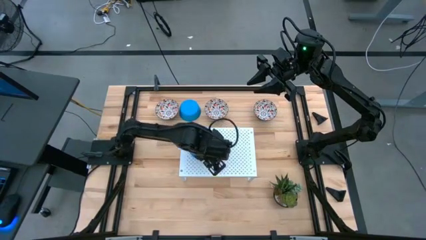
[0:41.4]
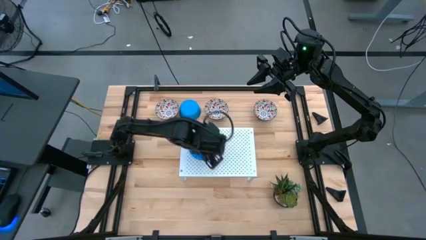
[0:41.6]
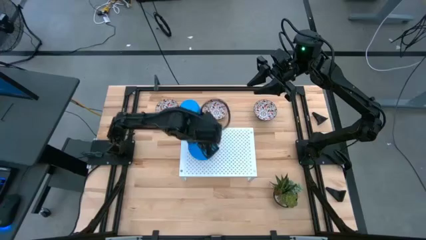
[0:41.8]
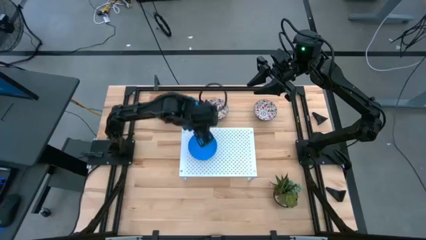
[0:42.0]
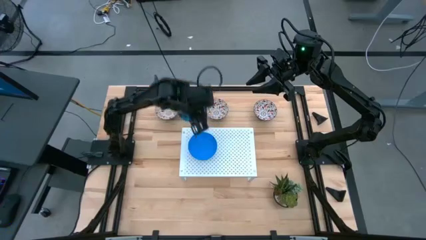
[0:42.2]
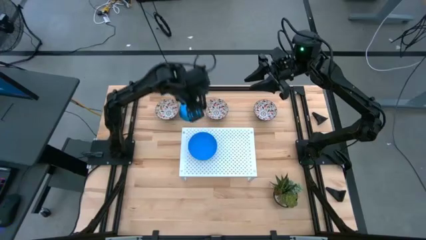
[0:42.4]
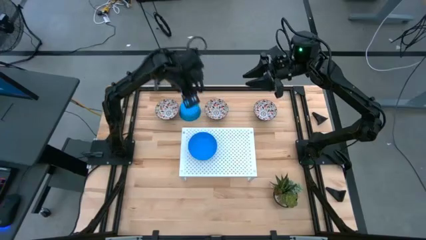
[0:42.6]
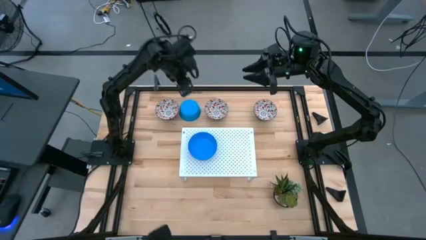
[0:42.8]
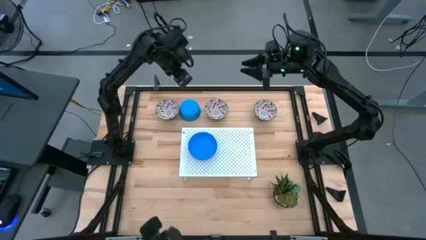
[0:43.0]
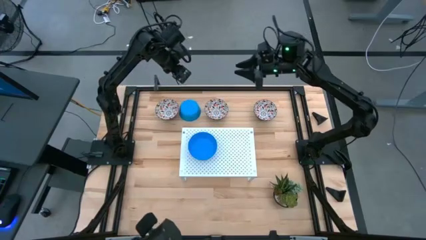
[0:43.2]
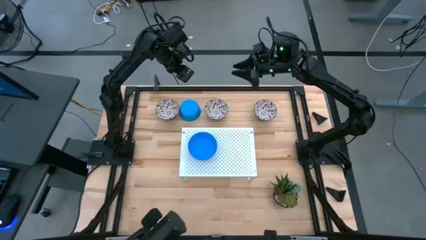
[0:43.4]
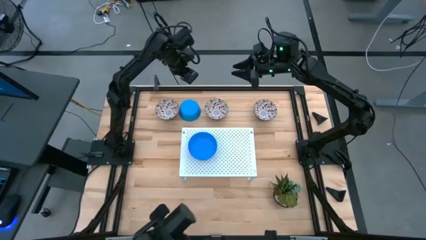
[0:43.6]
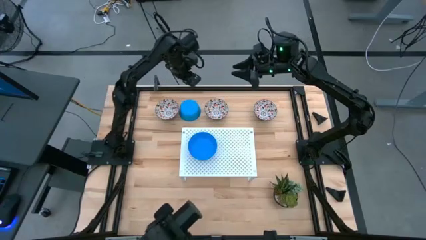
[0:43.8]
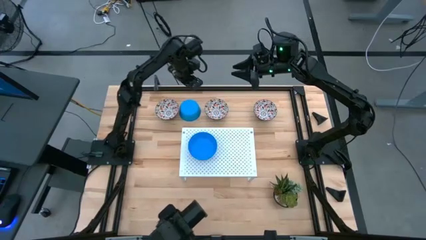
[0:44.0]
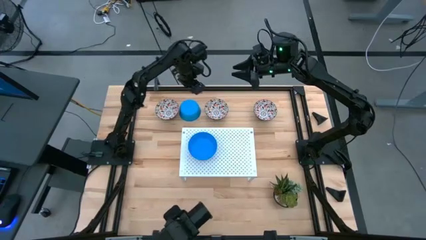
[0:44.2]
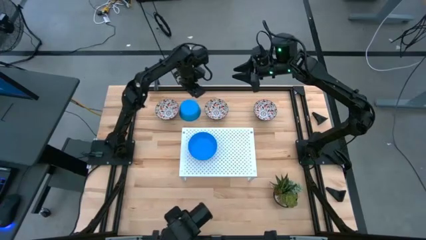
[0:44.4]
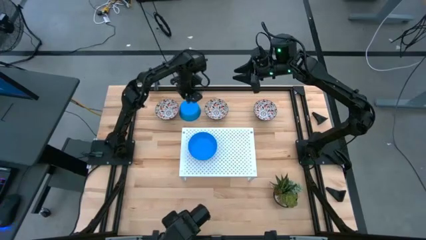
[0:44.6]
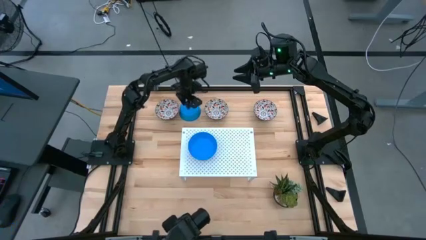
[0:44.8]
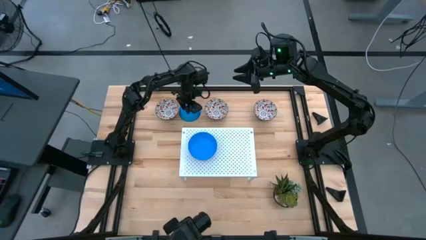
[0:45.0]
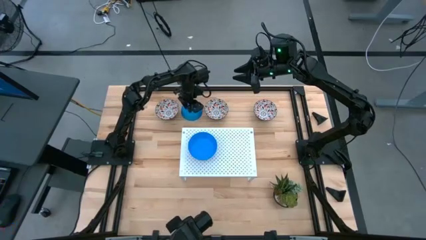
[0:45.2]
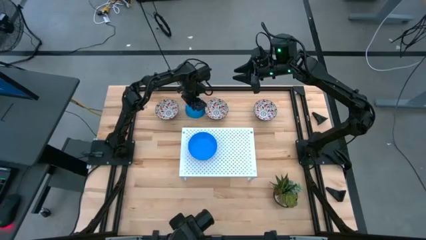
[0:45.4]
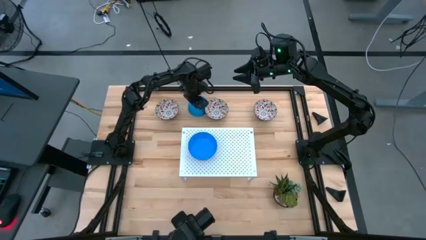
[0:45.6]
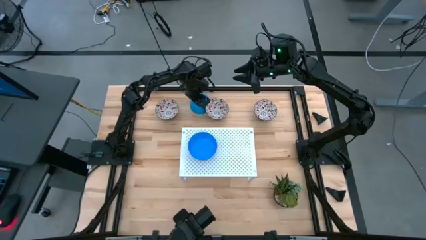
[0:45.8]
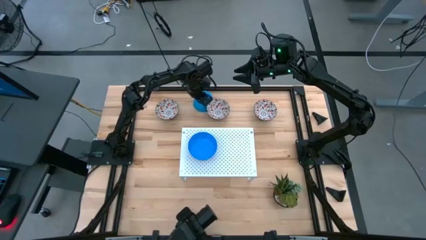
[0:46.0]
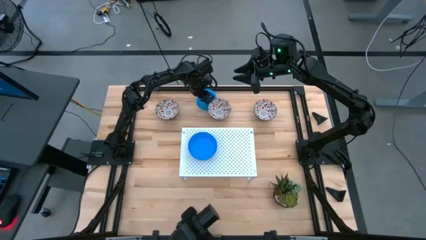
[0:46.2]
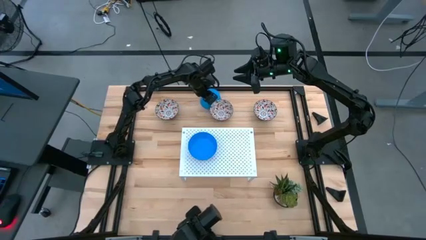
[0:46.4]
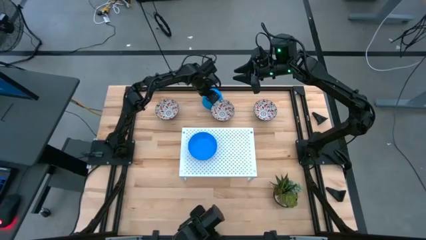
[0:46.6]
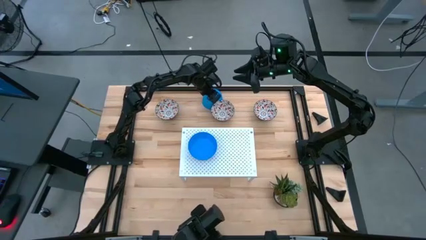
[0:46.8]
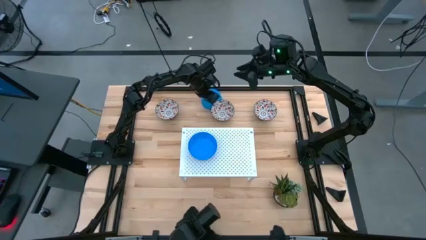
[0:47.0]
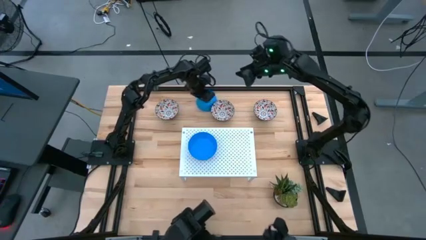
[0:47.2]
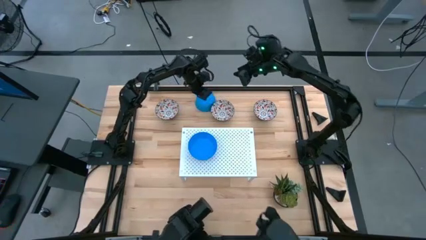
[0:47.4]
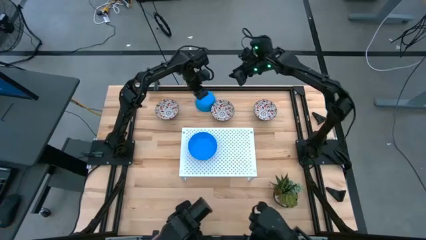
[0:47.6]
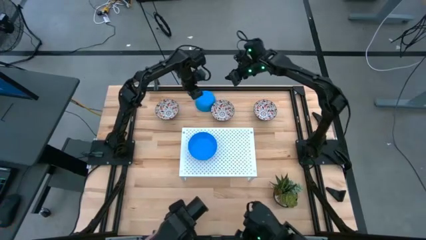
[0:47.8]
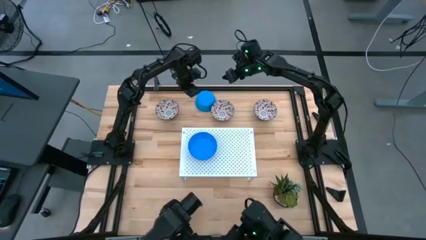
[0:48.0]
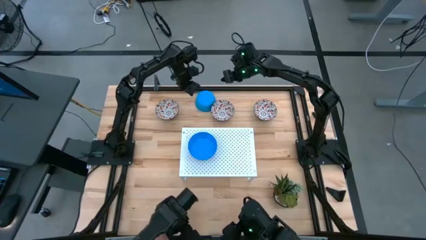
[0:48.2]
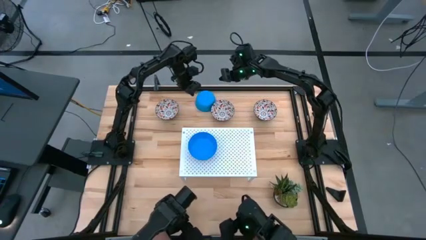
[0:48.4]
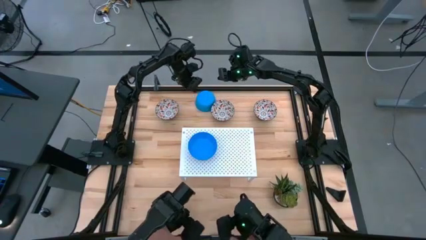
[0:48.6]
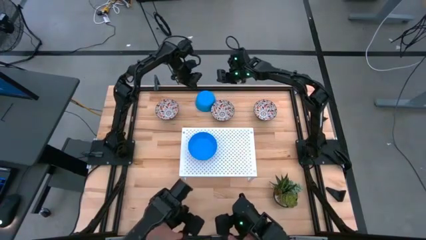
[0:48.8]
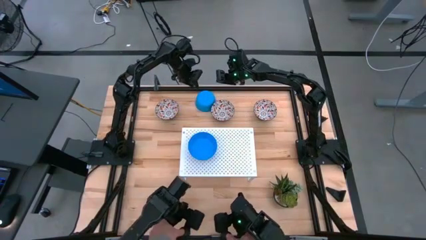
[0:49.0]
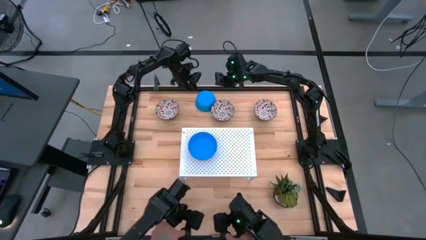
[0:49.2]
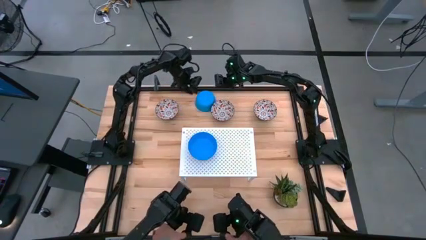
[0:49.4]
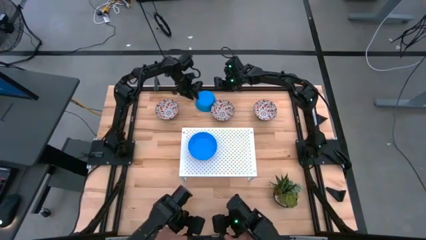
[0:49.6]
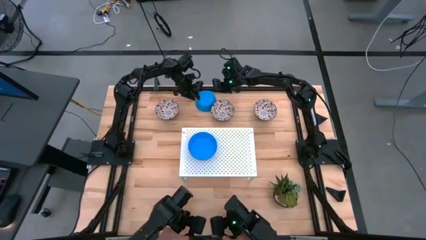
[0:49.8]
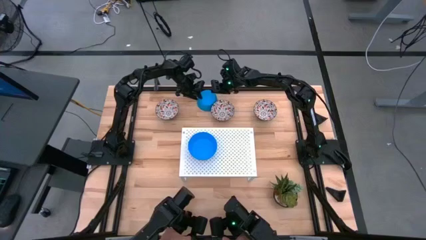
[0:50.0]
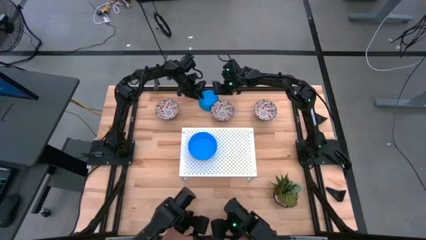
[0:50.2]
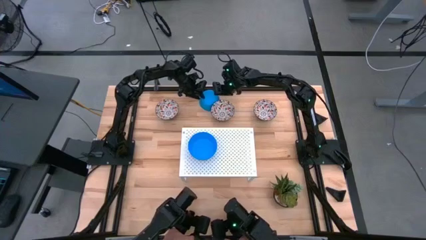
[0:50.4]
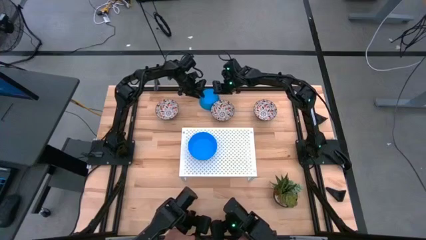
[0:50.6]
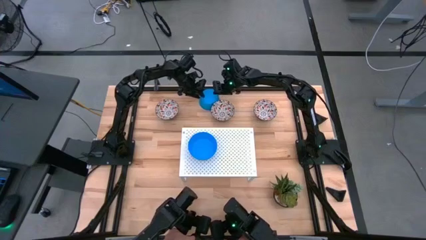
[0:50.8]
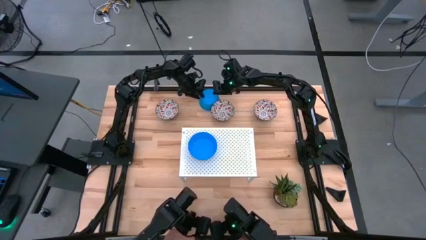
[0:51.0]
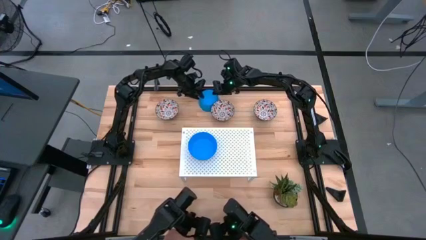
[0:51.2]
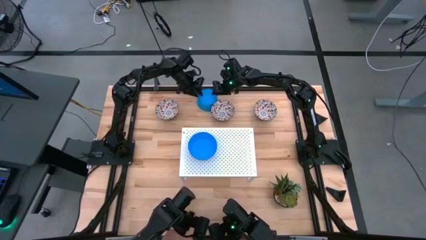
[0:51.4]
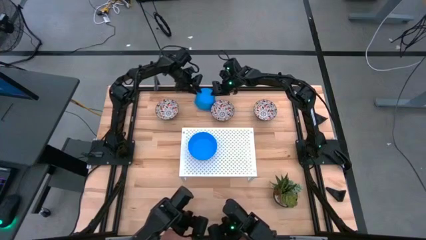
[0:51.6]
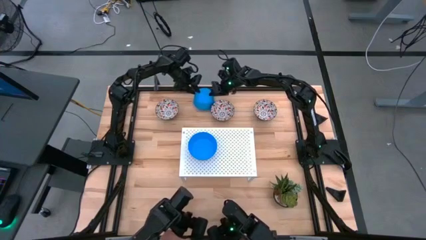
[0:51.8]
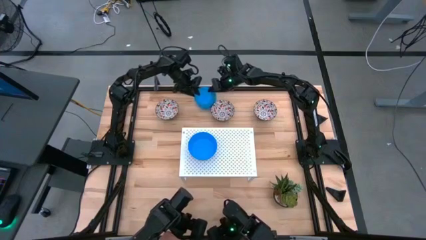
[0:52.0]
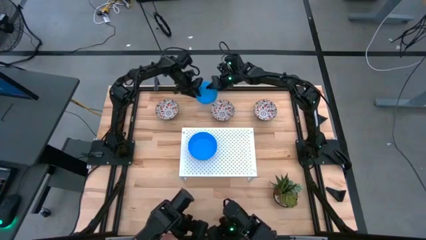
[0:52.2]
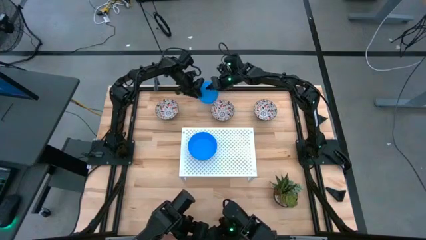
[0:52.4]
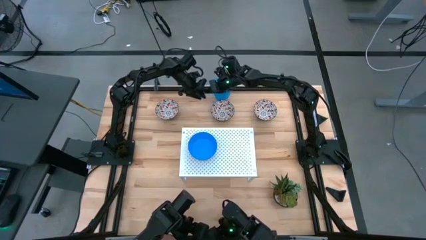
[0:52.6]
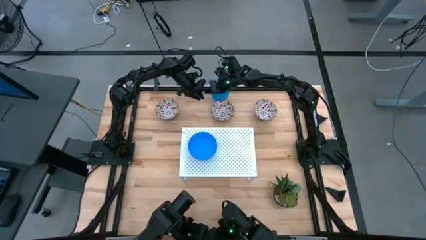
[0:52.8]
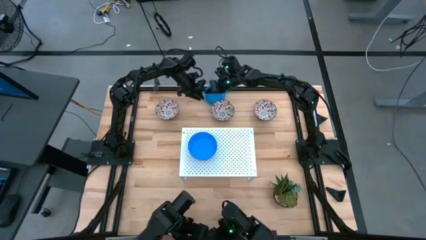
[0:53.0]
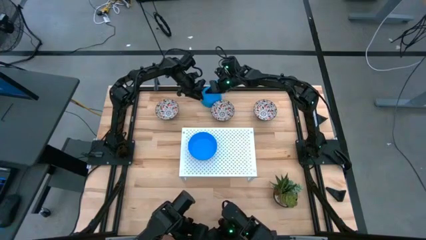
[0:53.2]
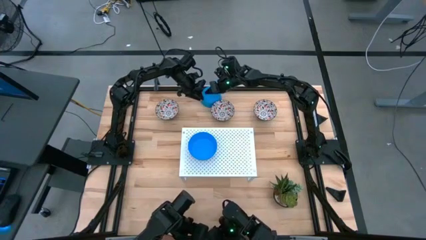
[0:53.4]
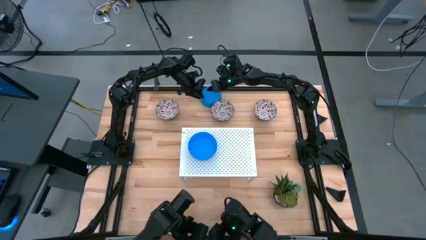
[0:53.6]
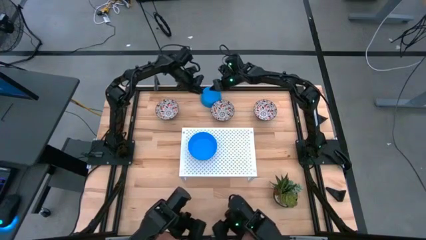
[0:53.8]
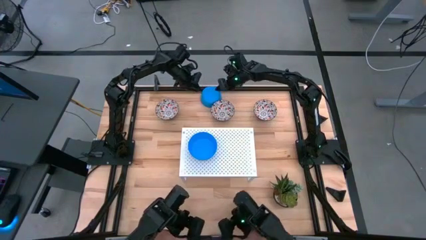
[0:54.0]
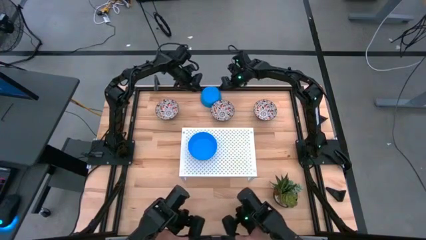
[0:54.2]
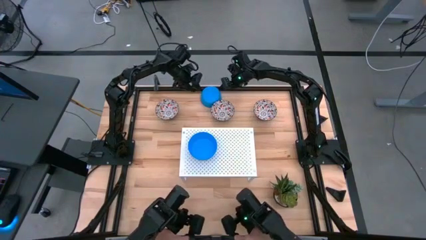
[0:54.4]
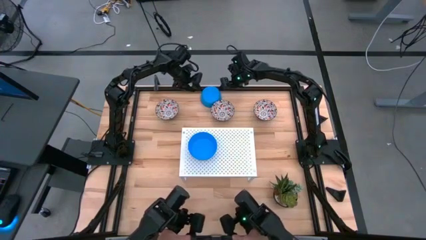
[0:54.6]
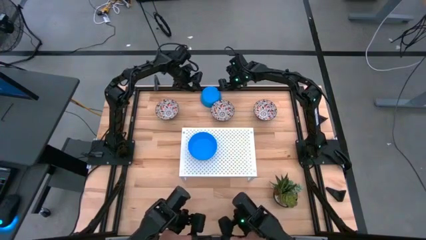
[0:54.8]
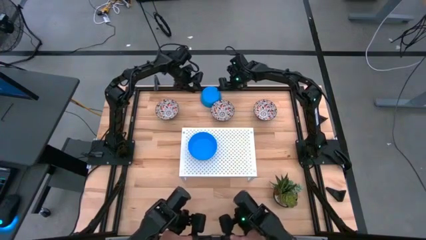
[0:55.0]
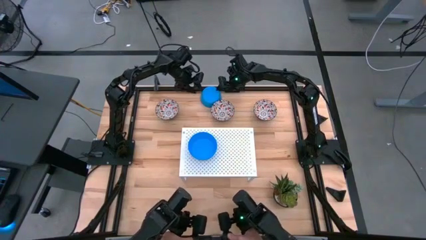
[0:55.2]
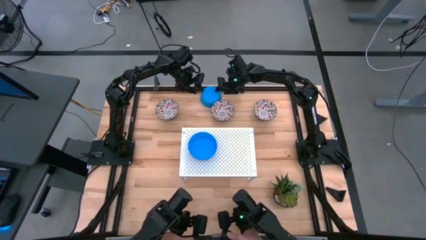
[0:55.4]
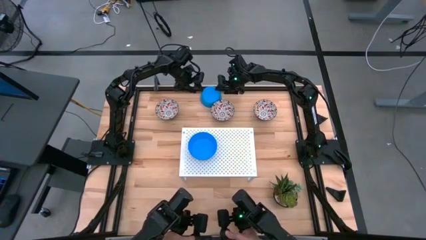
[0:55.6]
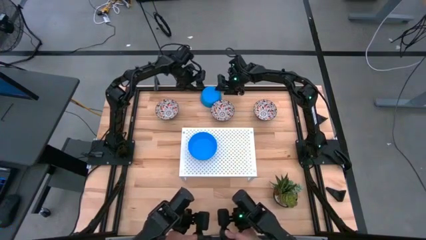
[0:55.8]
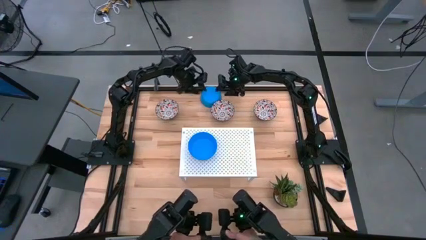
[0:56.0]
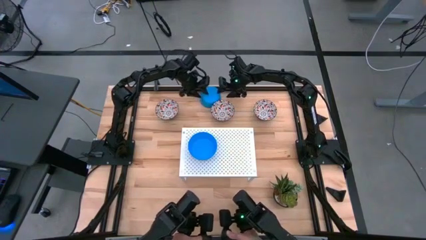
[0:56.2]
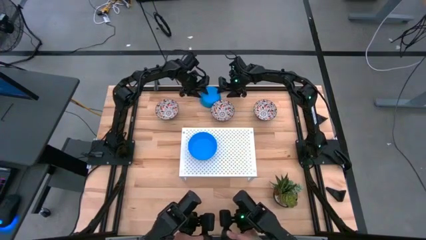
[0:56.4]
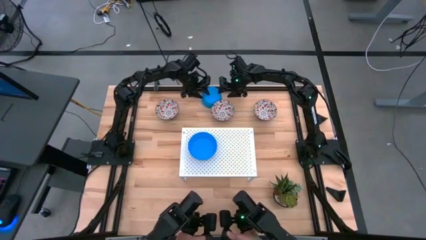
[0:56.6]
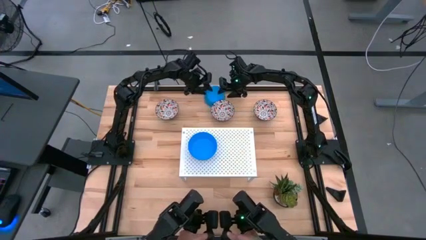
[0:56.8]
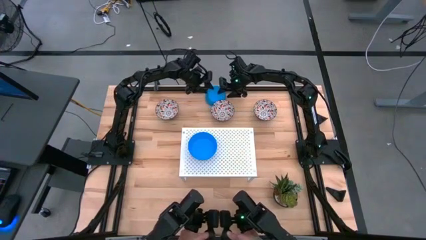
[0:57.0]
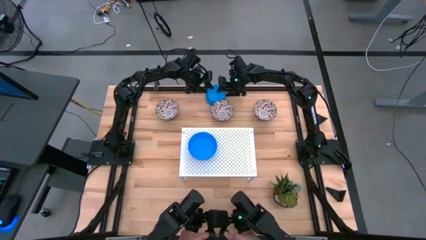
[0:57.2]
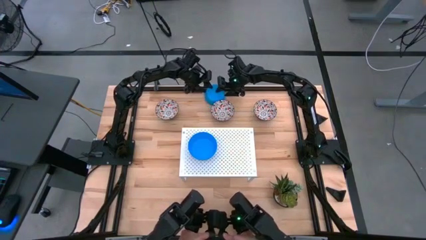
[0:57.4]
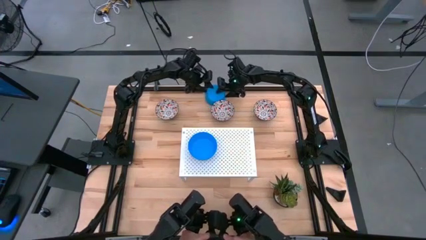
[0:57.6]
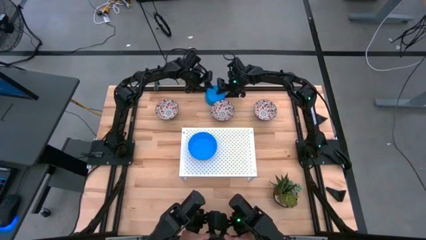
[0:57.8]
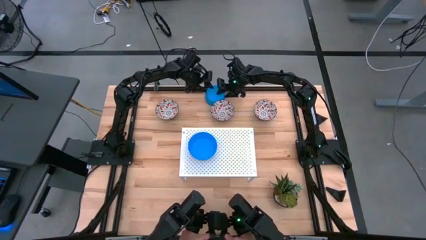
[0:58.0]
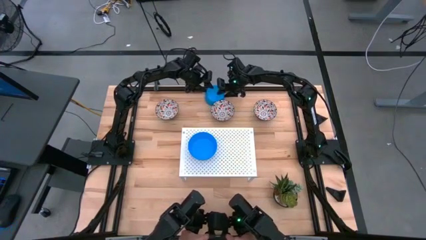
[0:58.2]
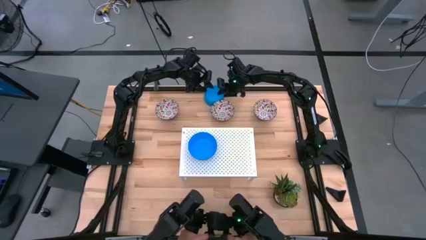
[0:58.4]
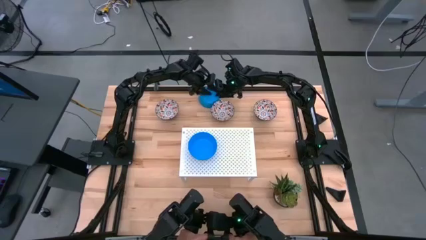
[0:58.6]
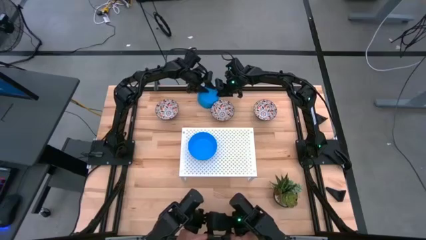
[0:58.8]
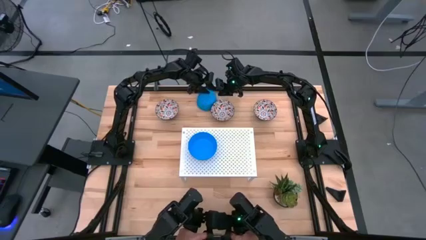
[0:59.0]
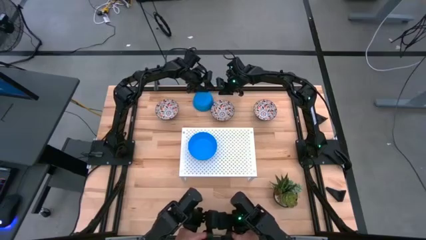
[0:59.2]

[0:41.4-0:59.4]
Task: Pick & Place Mini bowls
Stack the blue bowl on top of the blue bowl on the shelf
